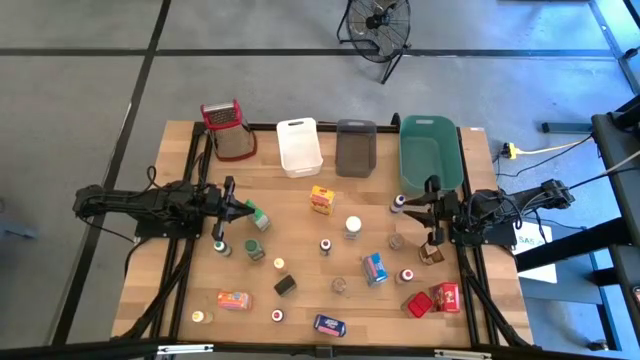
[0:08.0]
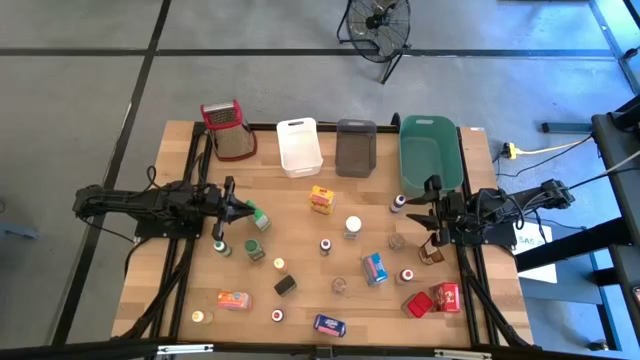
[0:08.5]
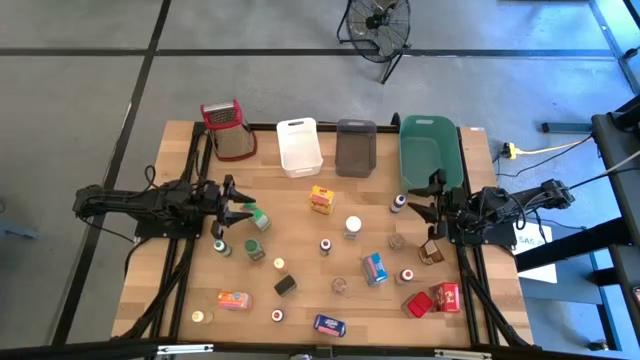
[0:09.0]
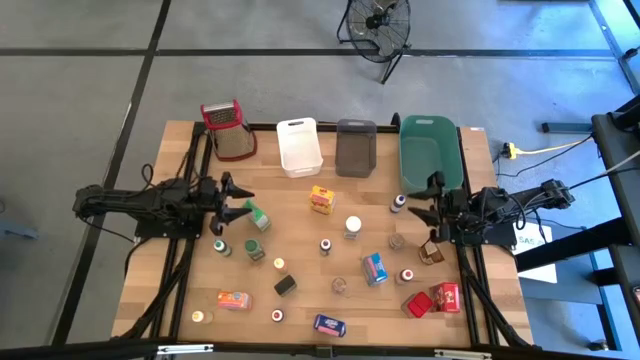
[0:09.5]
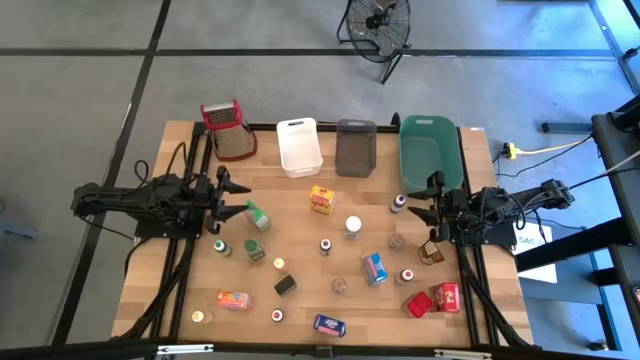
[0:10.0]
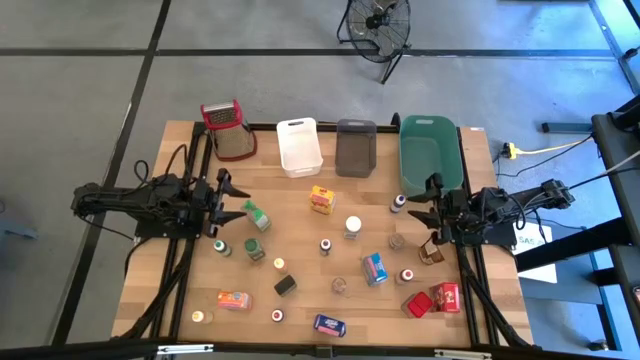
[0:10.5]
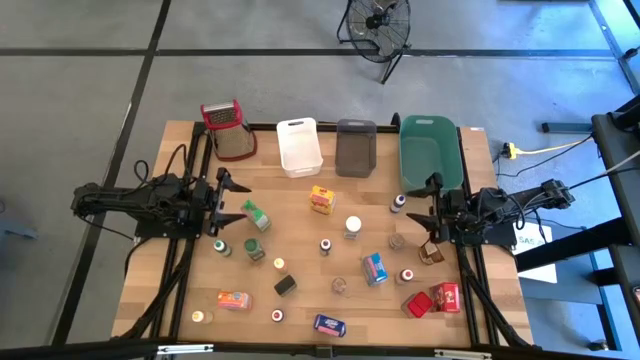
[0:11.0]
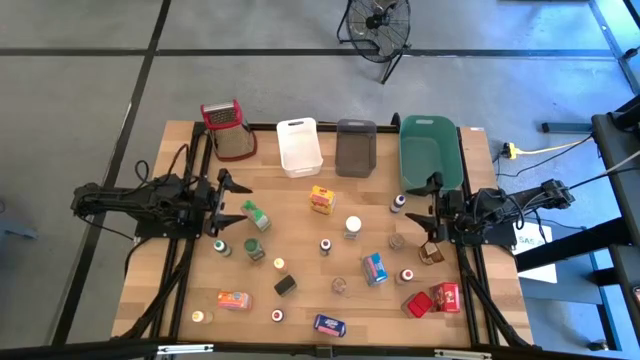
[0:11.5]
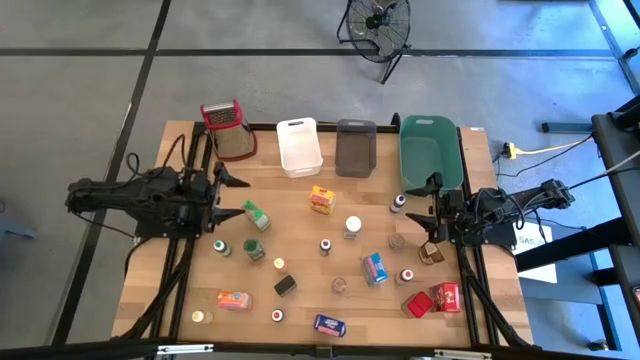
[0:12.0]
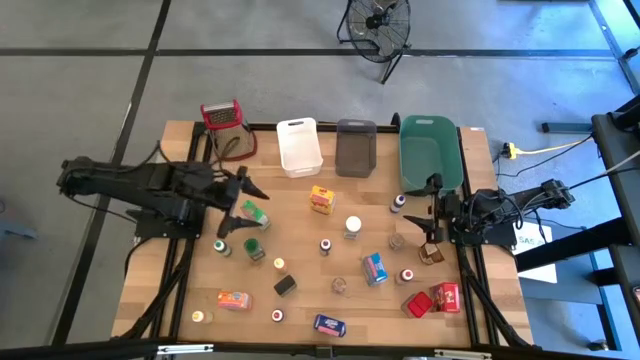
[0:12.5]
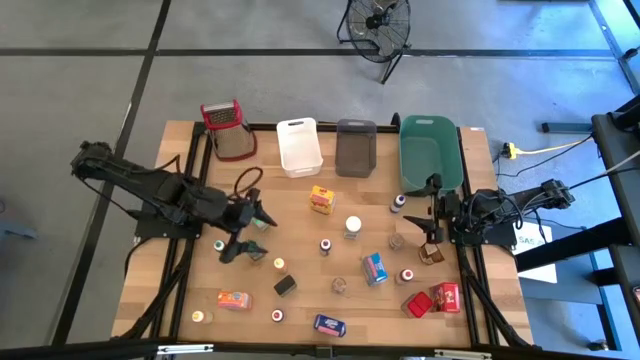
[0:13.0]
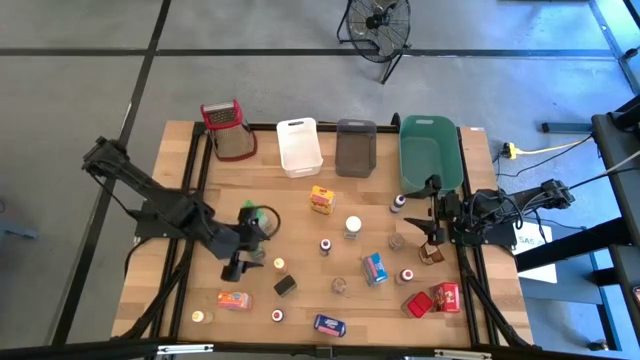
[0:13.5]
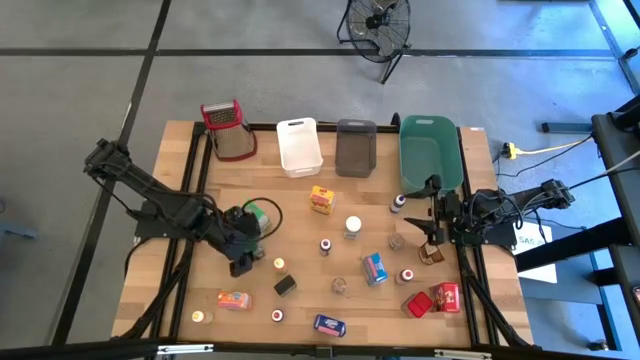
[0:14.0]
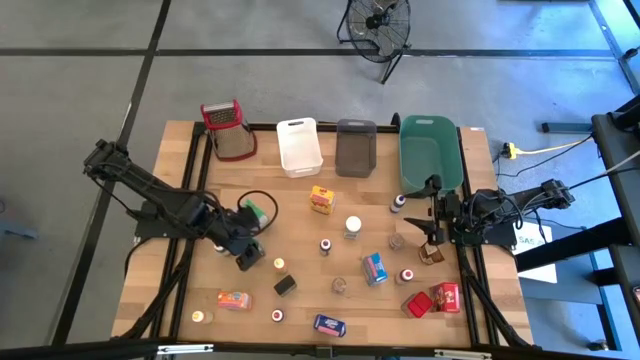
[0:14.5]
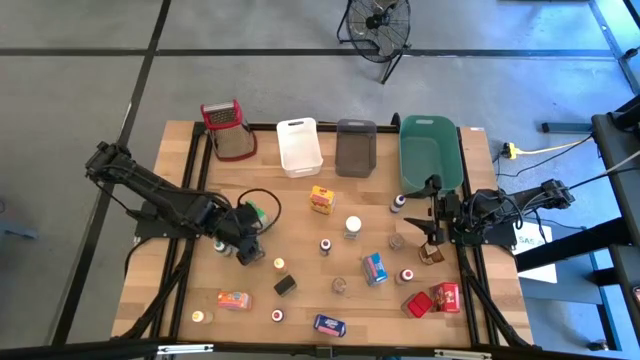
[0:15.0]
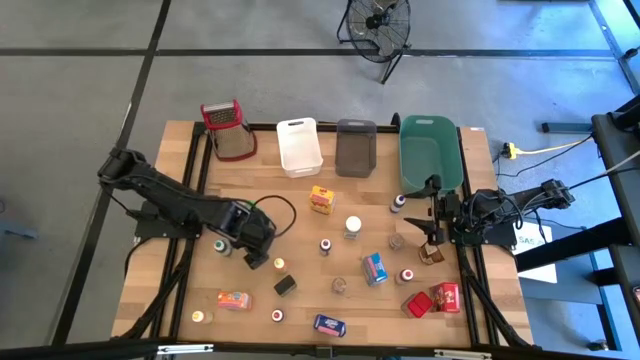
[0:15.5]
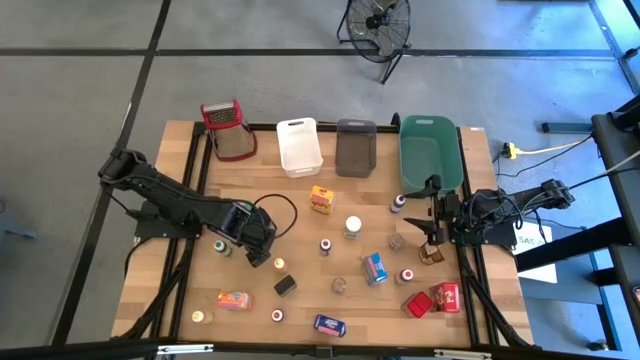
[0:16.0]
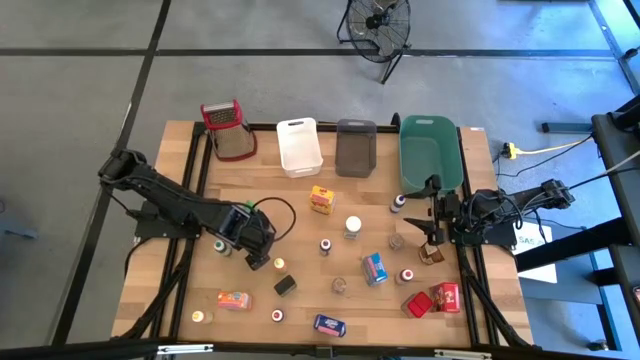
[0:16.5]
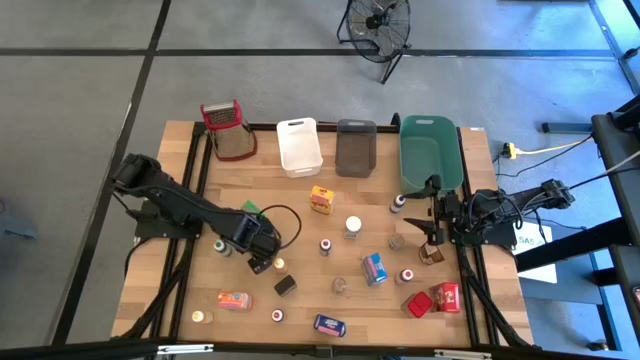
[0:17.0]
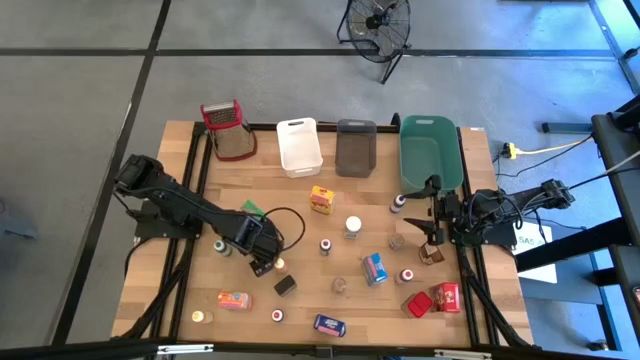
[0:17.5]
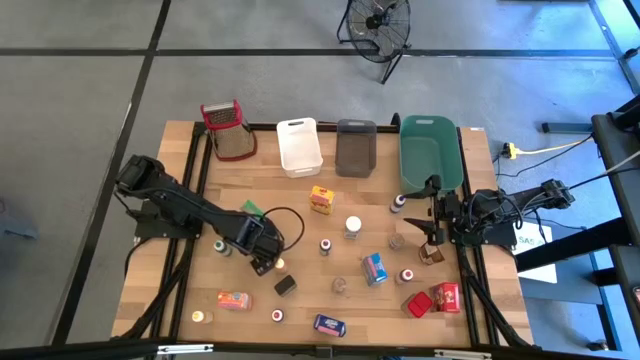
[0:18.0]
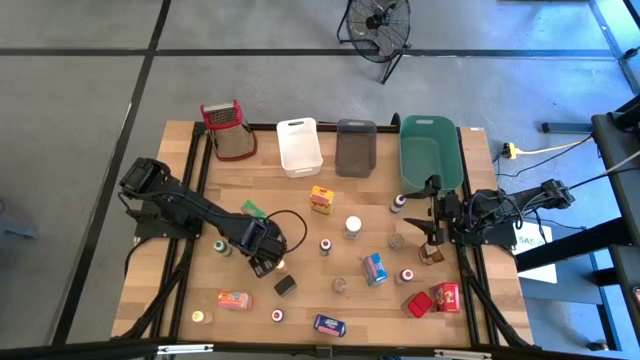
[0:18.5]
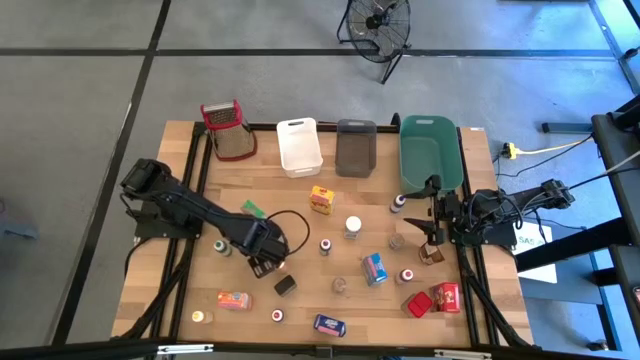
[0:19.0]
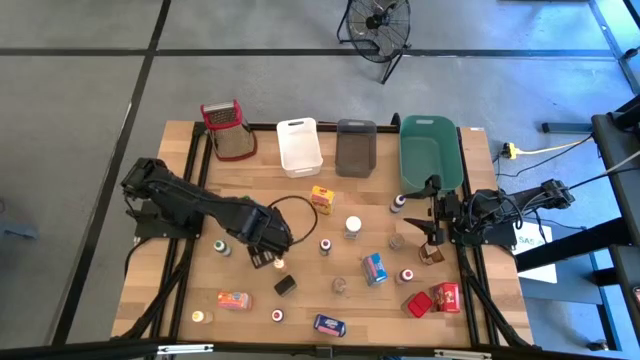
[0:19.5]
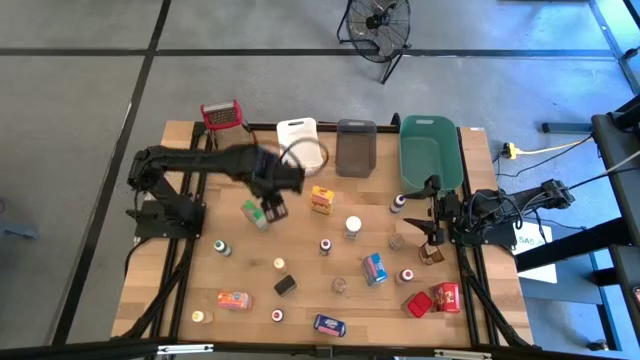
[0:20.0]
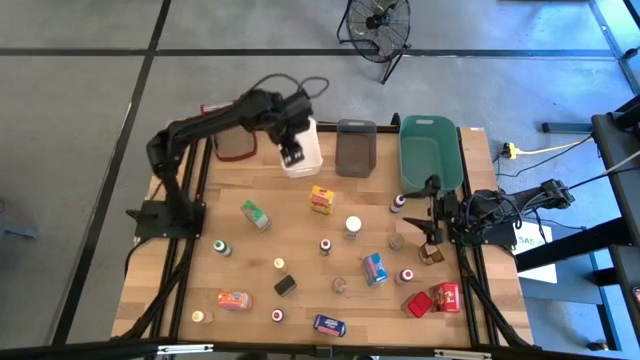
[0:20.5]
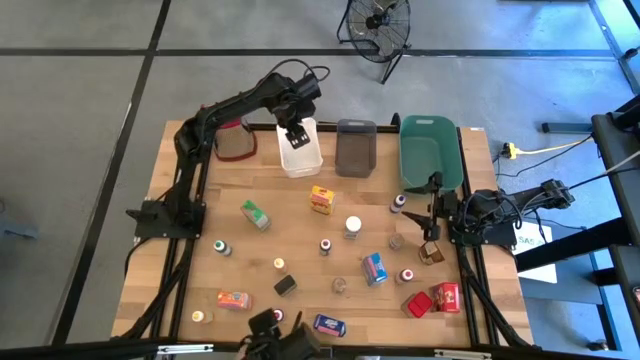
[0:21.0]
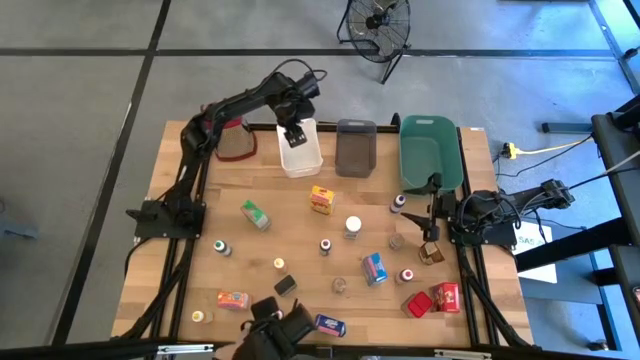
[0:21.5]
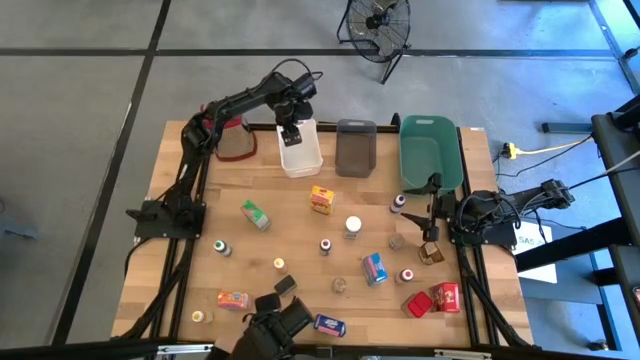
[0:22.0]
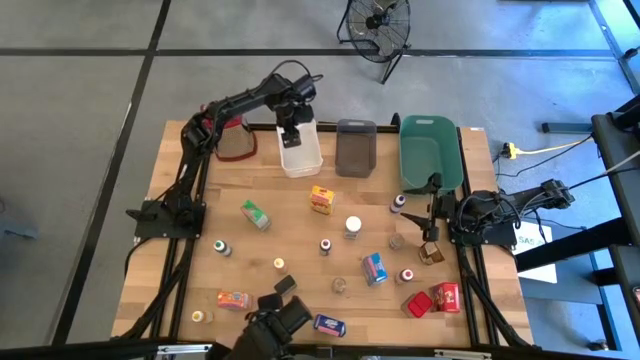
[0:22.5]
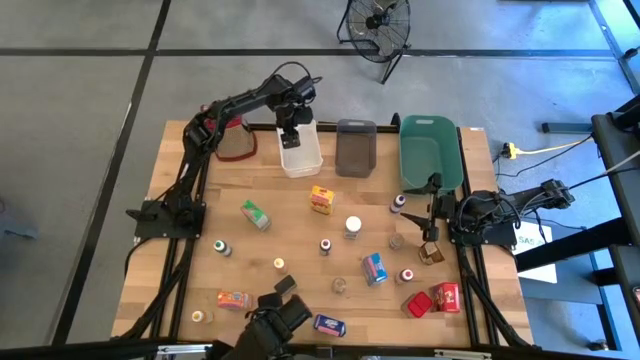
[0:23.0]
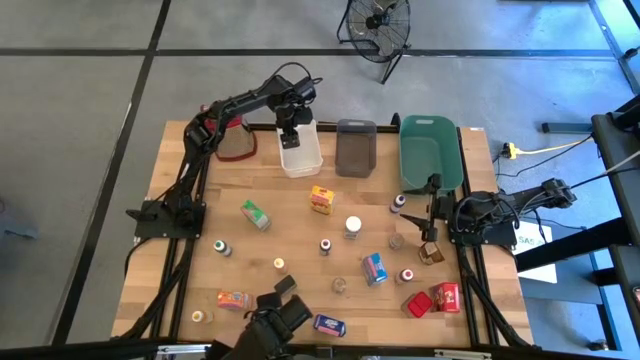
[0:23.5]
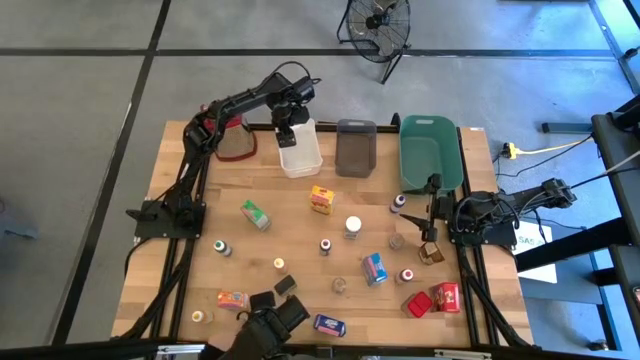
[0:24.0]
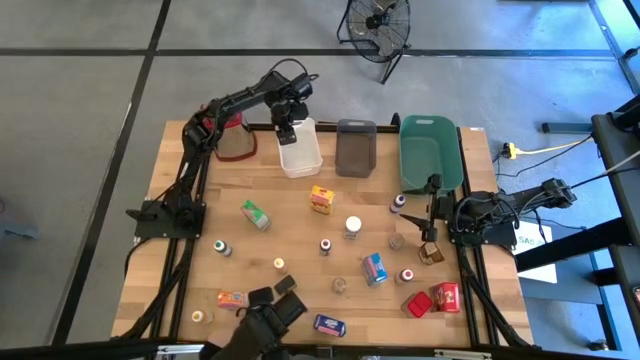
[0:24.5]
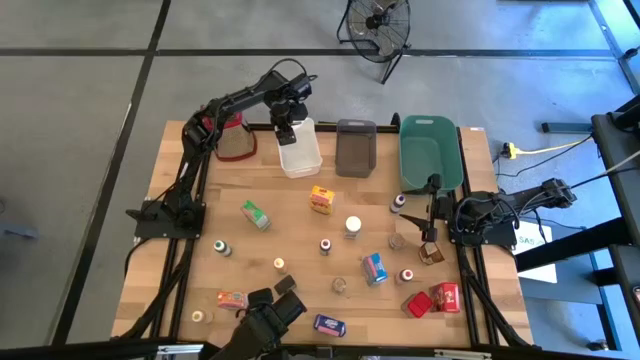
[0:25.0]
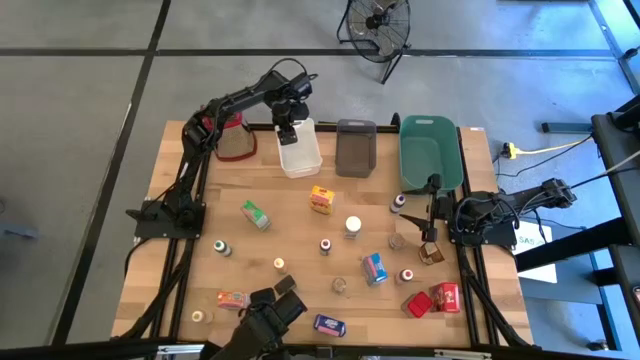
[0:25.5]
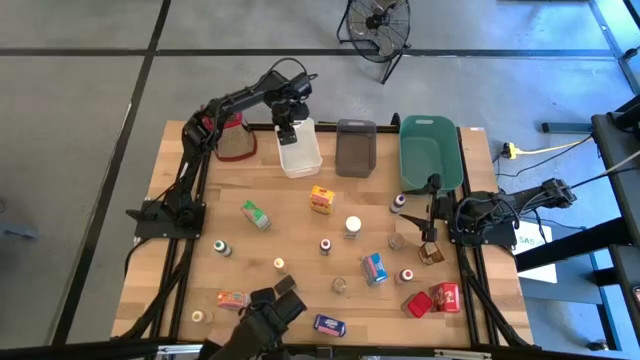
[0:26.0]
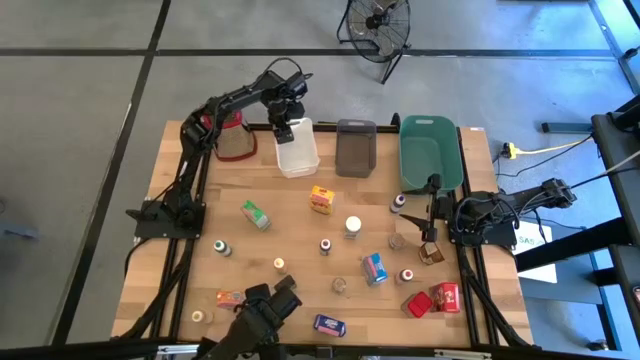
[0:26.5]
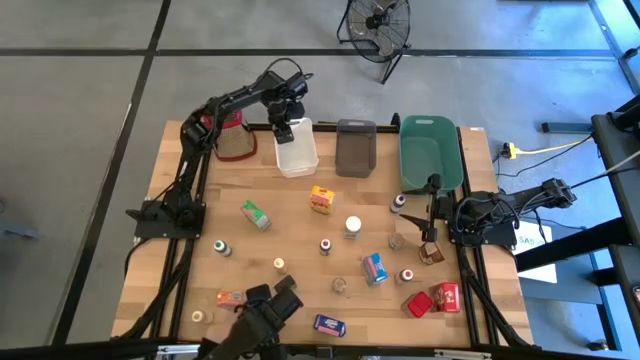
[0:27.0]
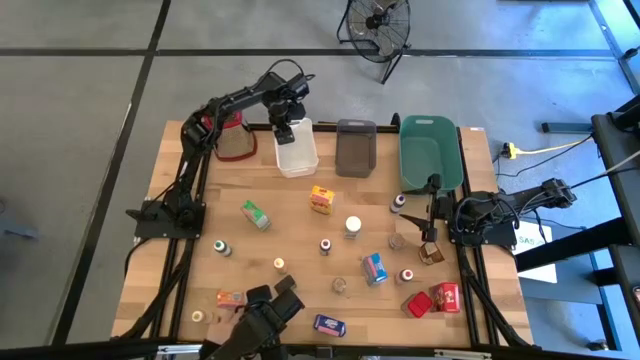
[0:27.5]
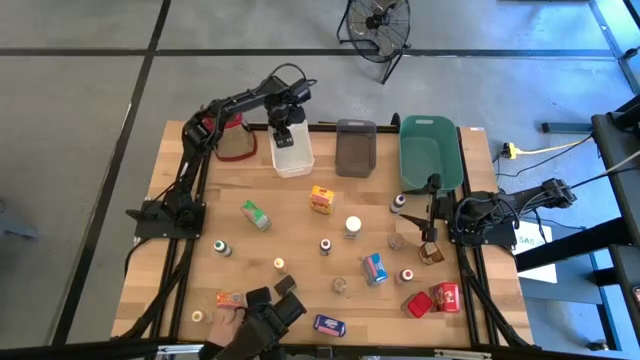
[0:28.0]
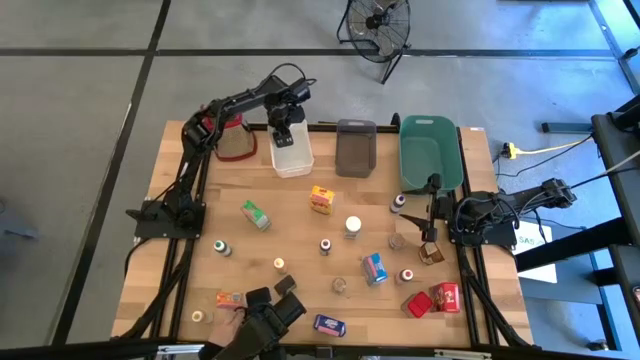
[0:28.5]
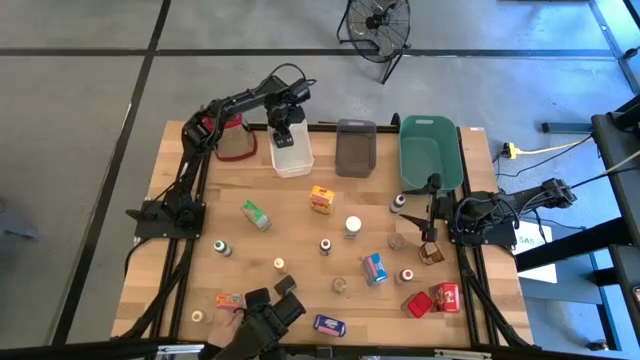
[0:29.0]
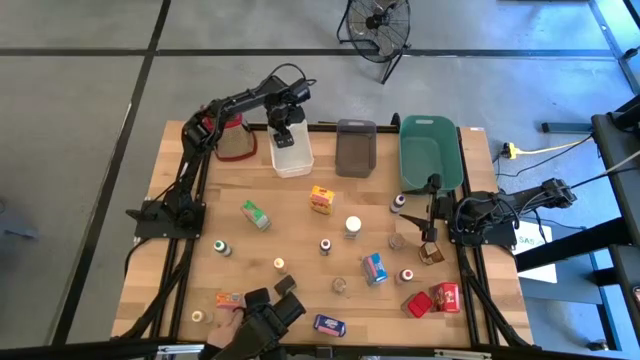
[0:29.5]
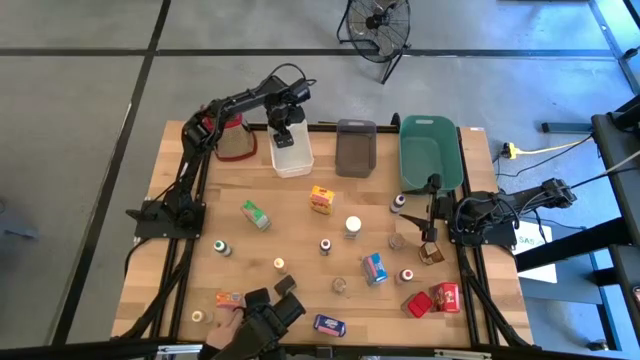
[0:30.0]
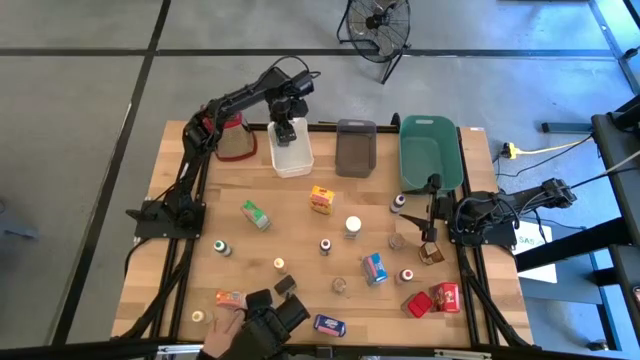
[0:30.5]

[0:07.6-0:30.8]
Task: Pick & Place Kitchen Items
Put the green seasoning bottle into the white bin
